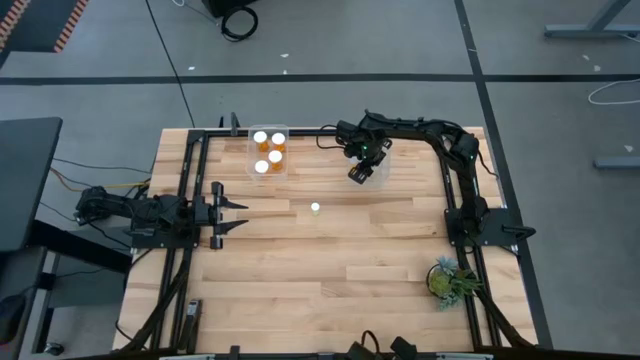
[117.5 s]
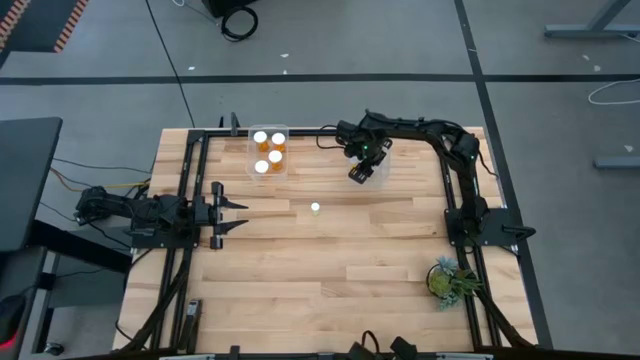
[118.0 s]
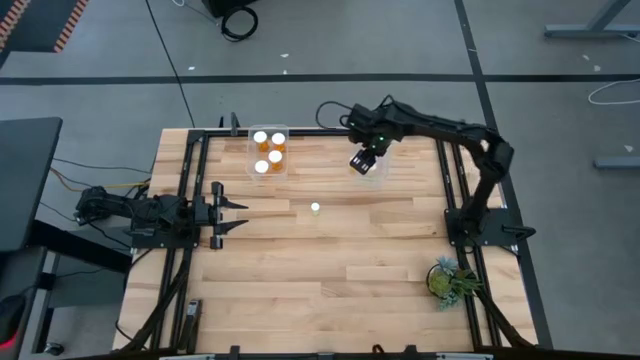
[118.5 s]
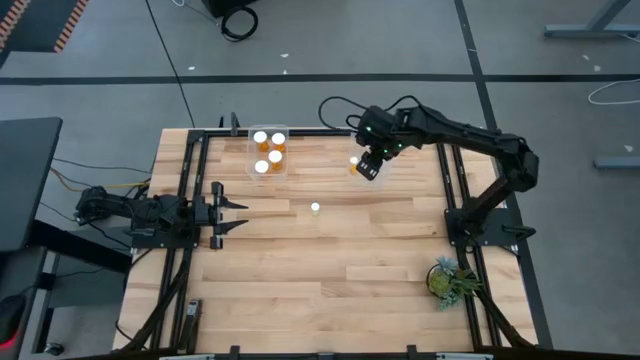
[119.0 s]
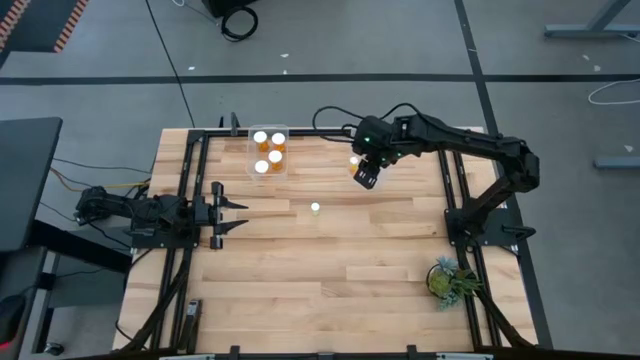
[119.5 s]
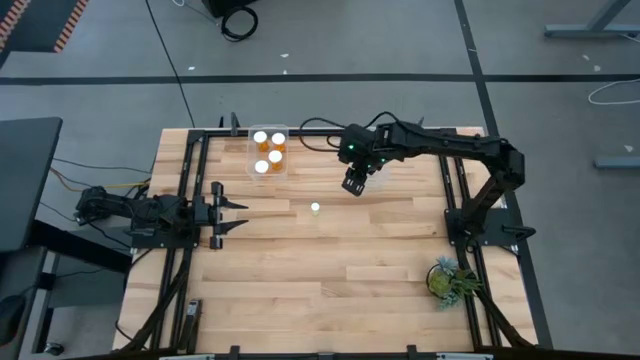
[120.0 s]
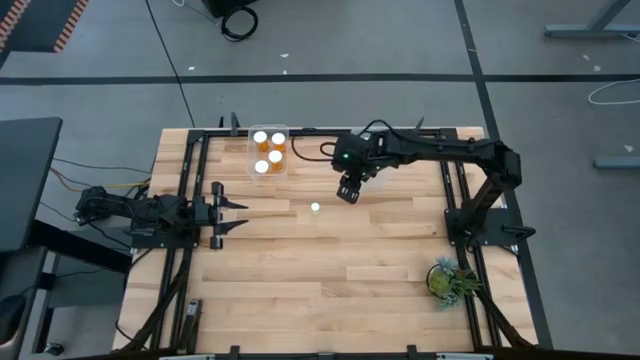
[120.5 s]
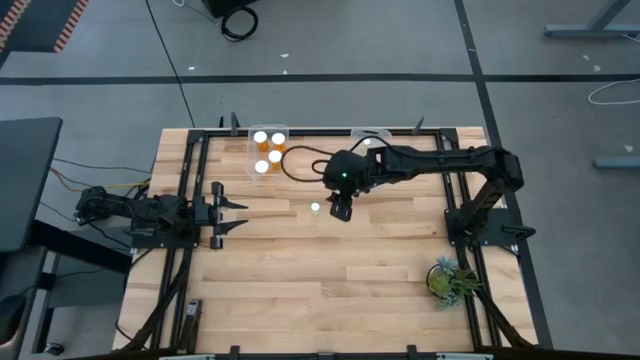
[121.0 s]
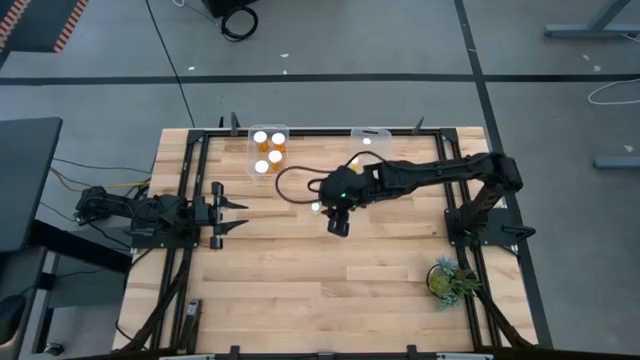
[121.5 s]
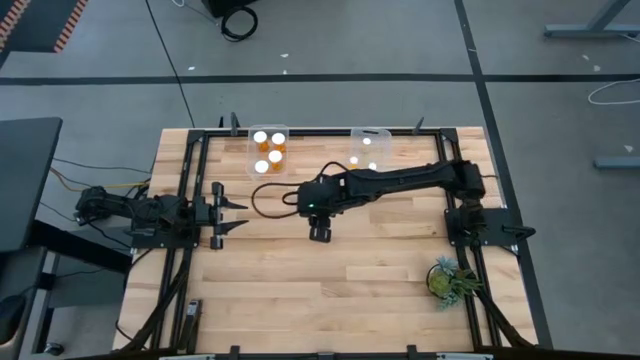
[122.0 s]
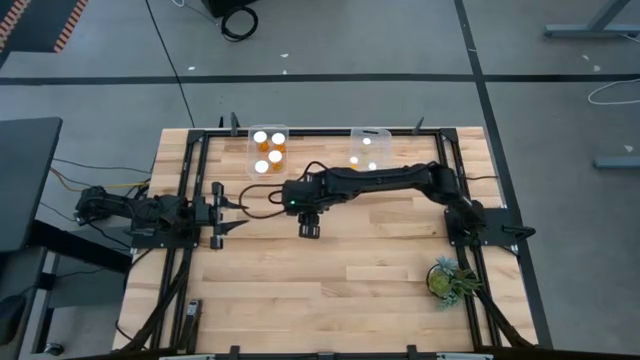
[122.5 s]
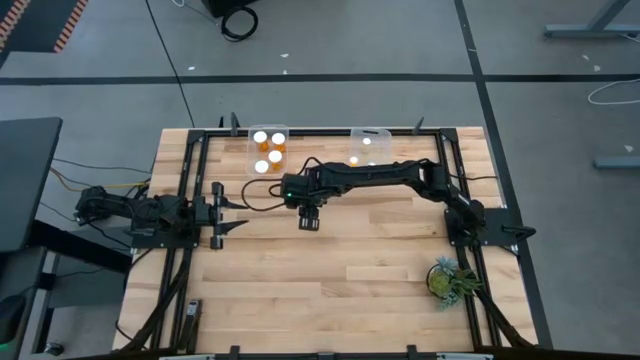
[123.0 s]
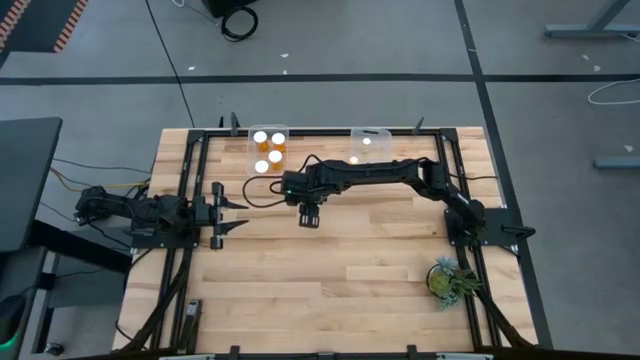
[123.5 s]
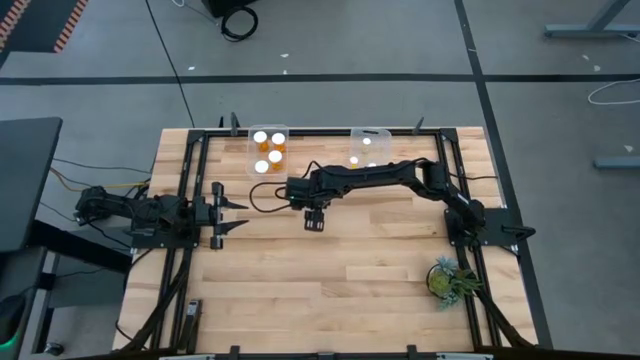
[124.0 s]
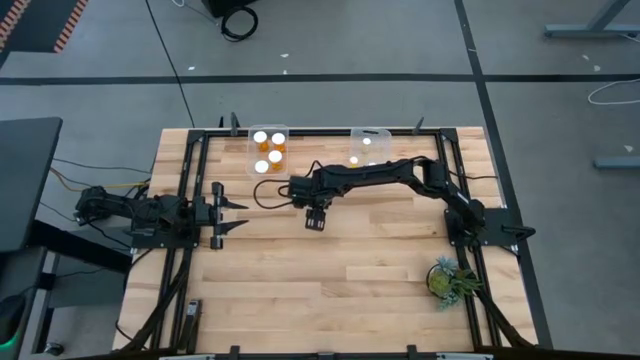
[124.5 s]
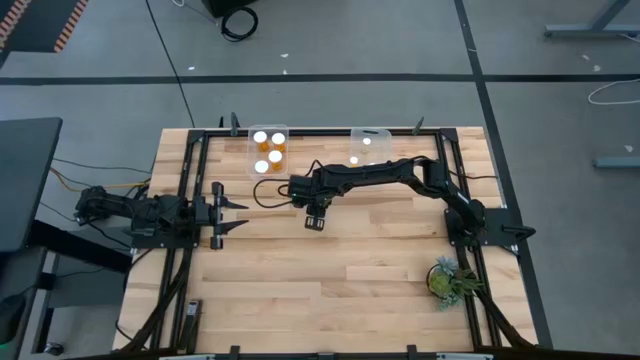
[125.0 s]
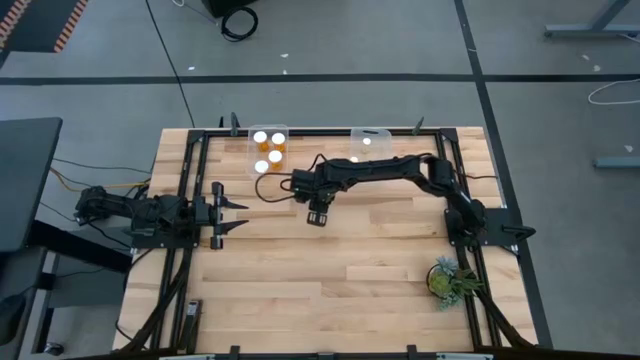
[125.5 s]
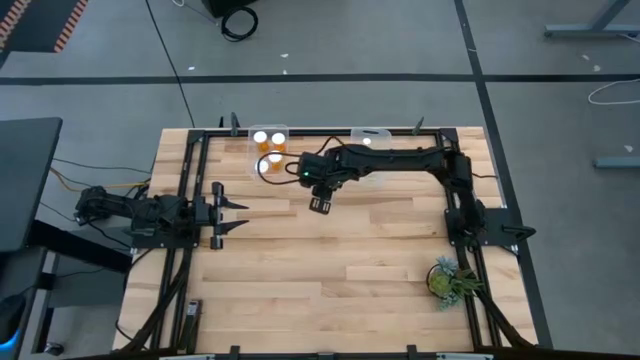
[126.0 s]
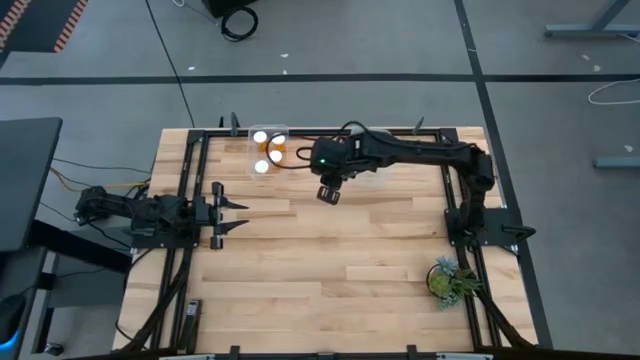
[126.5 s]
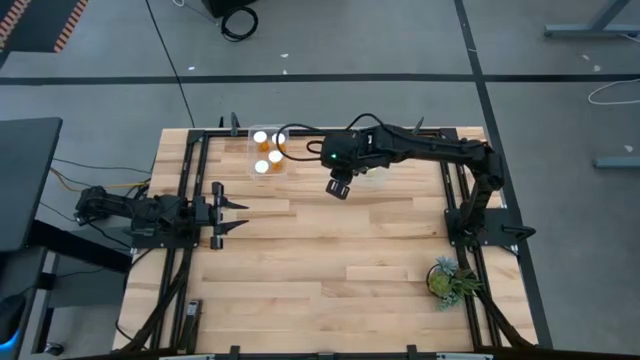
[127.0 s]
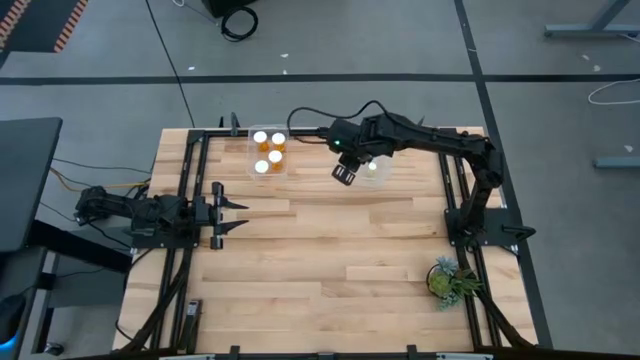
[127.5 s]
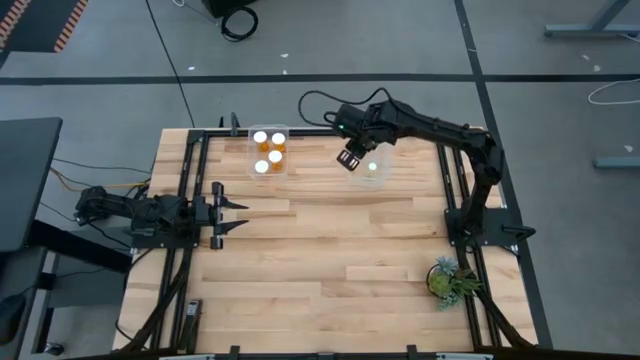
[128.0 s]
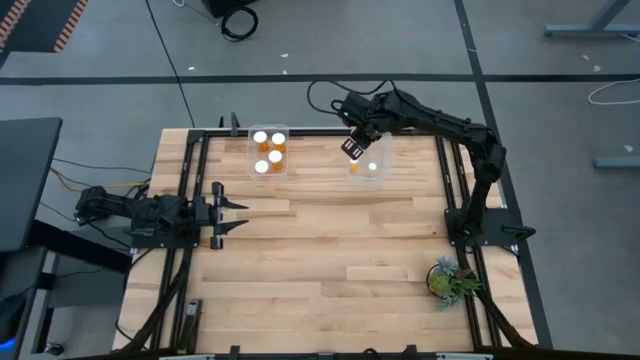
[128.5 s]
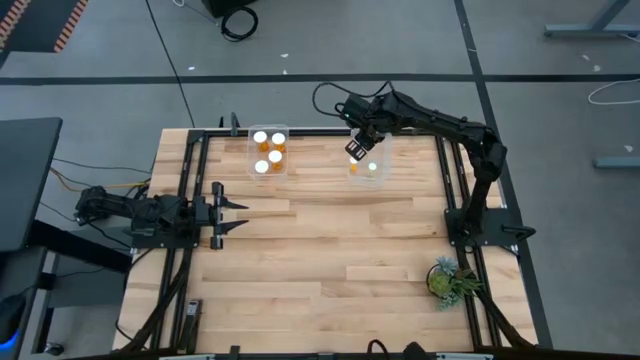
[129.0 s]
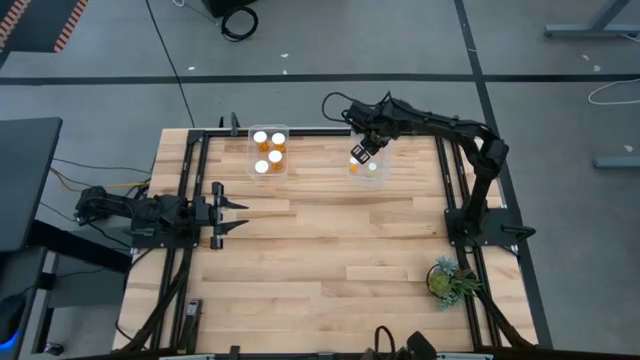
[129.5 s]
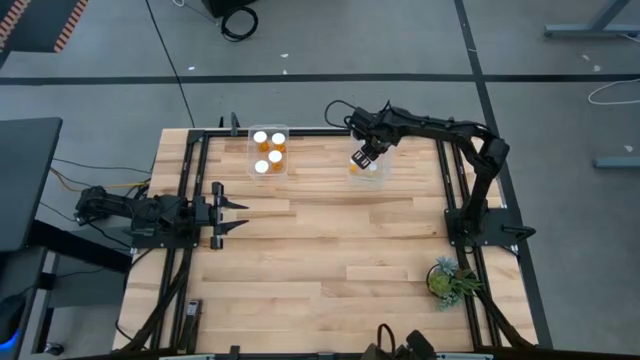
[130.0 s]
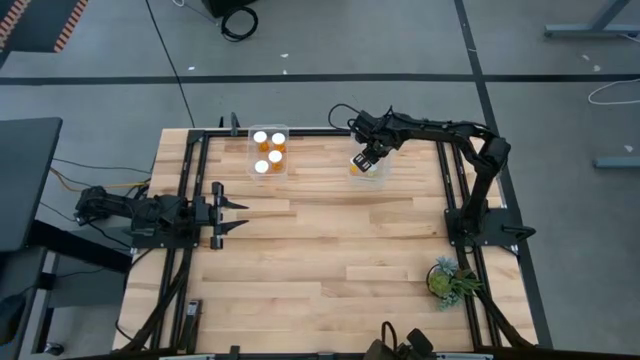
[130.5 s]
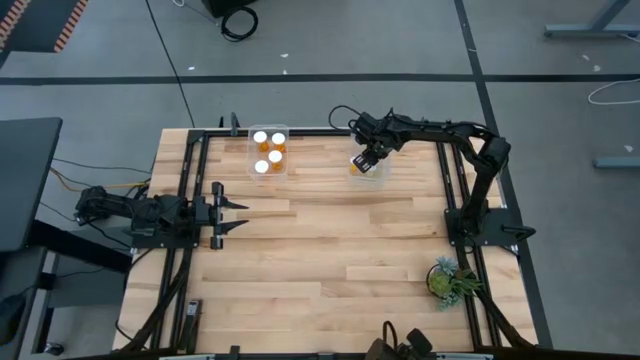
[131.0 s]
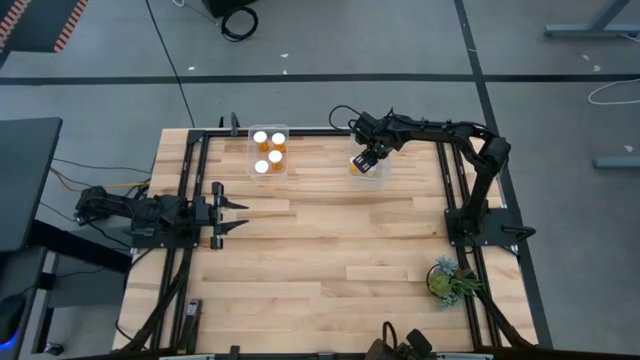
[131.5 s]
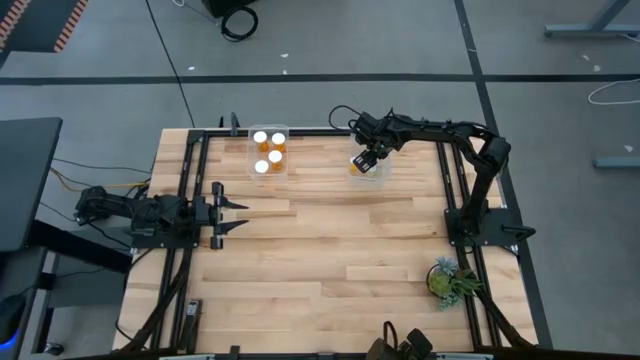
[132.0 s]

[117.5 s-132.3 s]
Task: Pick and place medicine bottles into bin by pill shape (circle, oval)
Put the yellow tablet bottle into the right transparent bin

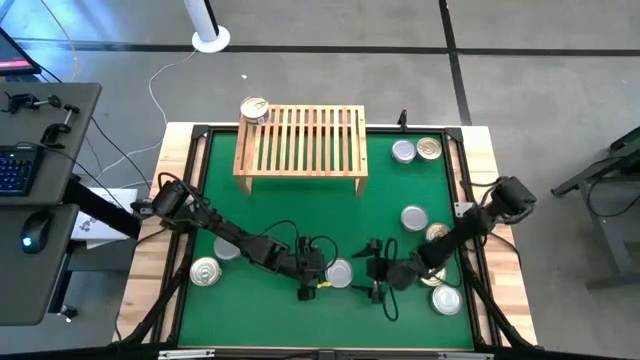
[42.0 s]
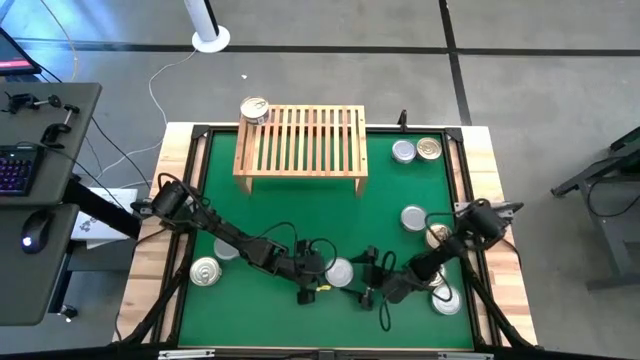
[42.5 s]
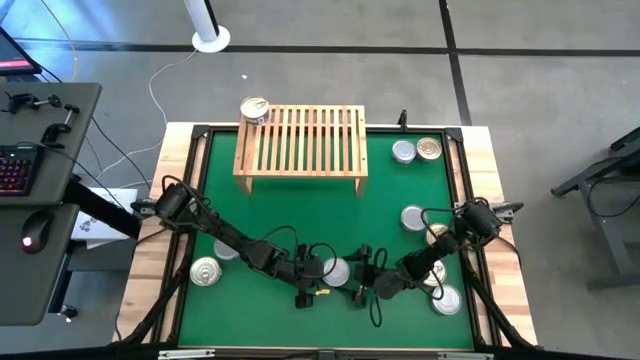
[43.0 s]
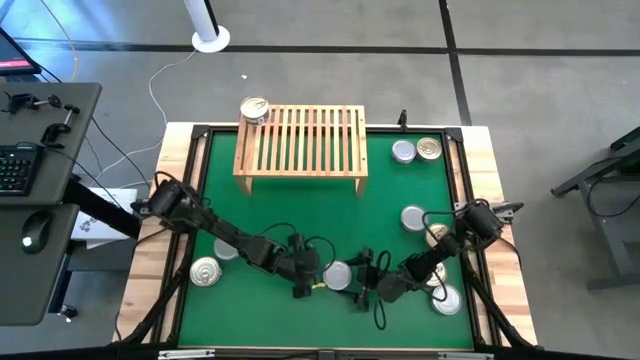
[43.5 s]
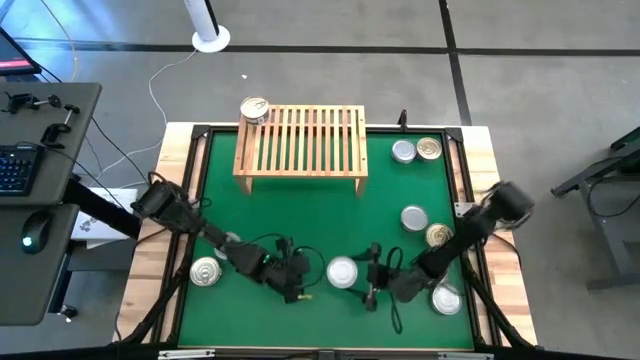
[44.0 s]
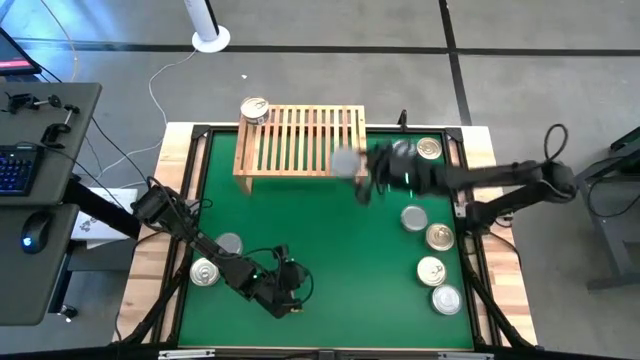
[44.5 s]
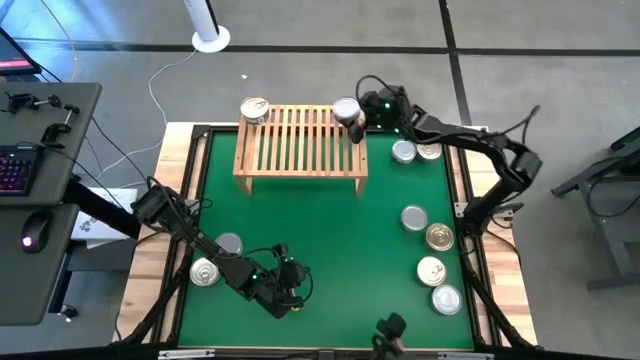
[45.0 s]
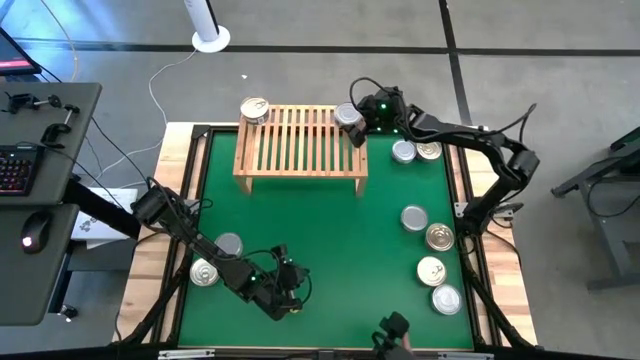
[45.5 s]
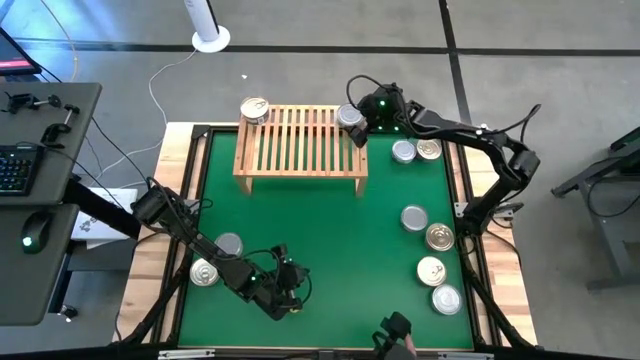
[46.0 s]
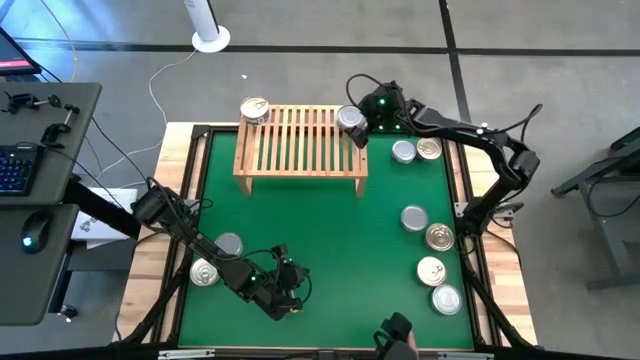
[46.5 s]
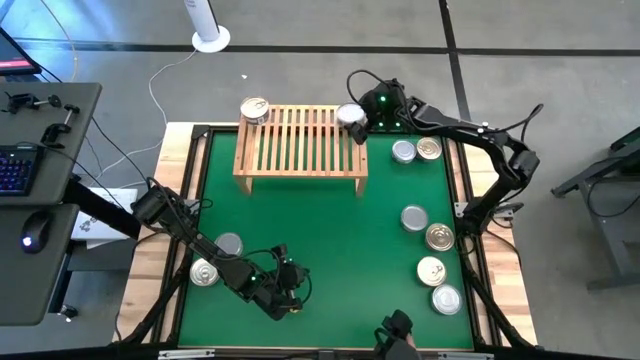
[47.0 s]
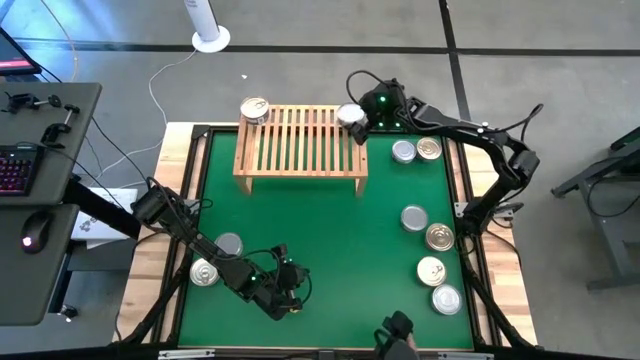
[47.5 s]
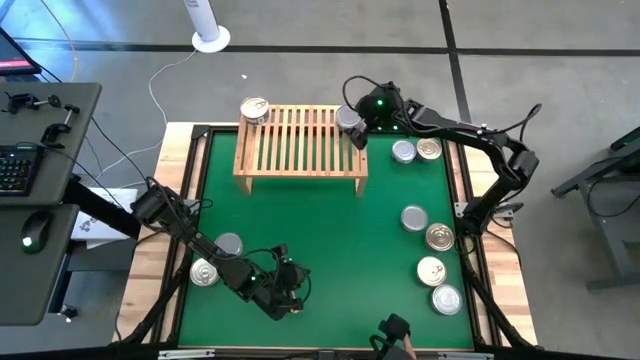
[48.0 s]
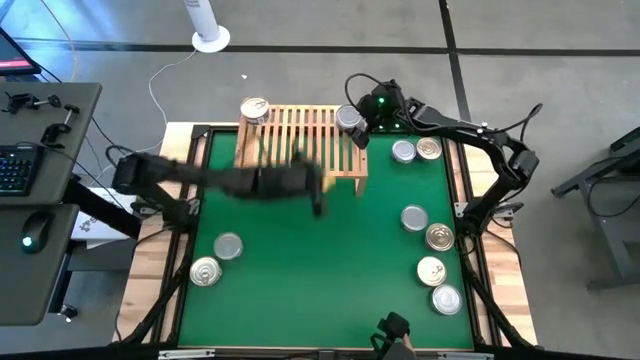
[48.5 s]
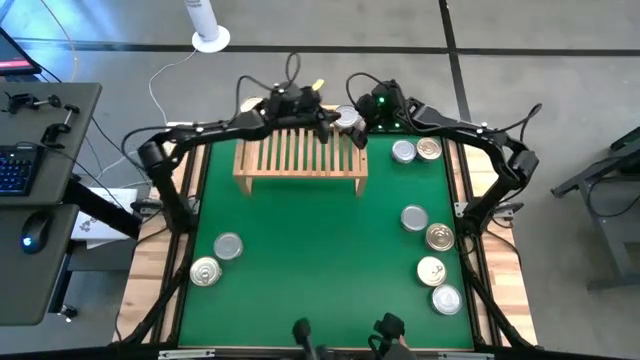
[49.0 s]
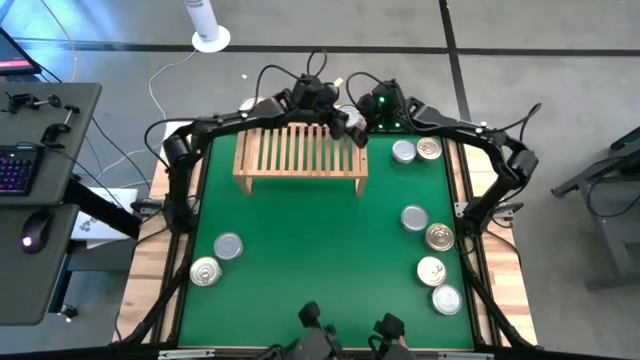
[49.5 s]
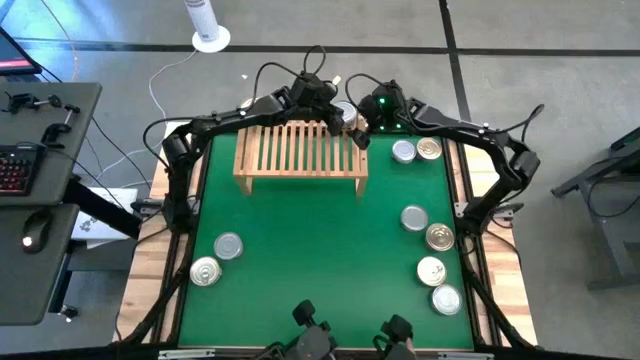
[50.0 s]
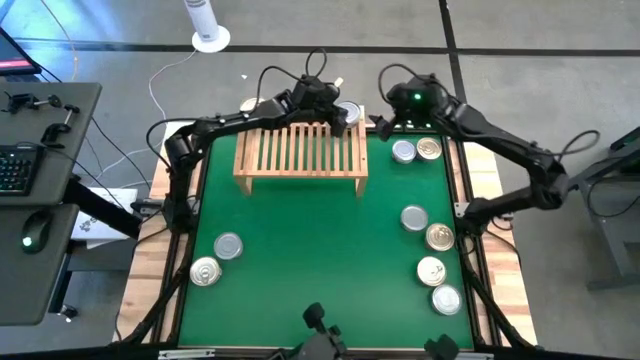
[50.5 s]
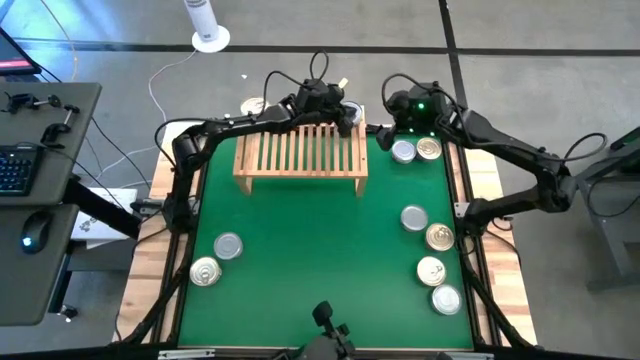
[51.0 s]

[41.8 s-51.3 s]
Task: Stack canned seafood by type on shelf
Put the green white tuna can on the shelf
